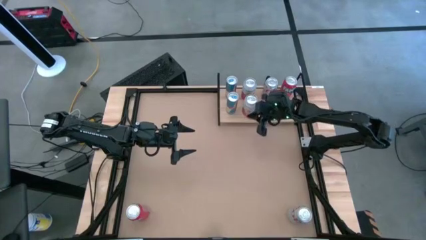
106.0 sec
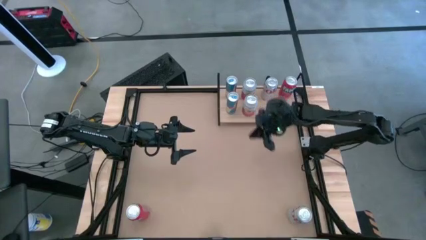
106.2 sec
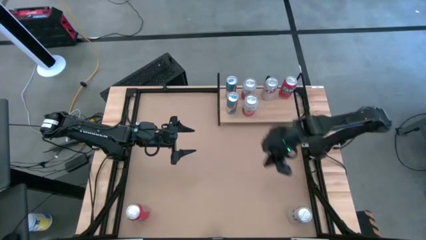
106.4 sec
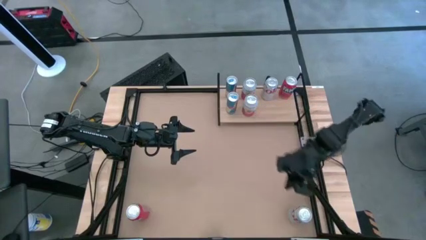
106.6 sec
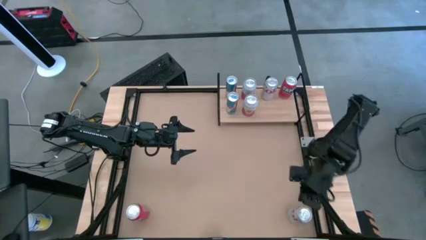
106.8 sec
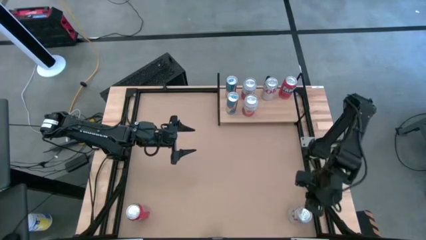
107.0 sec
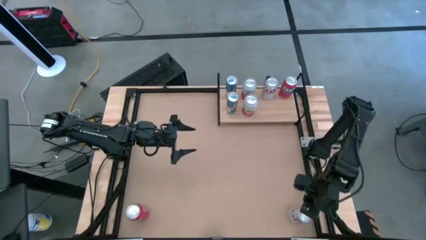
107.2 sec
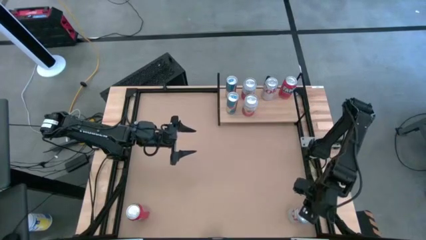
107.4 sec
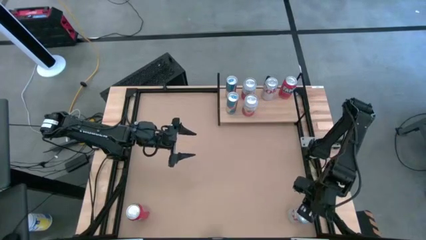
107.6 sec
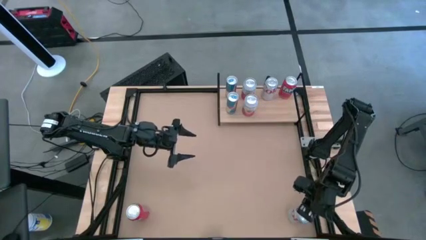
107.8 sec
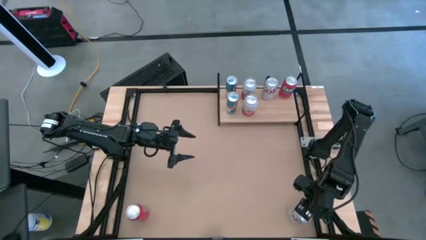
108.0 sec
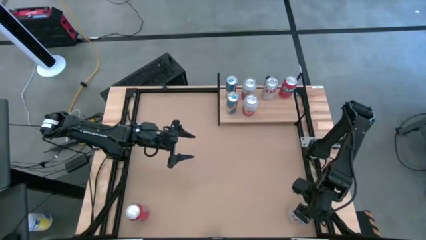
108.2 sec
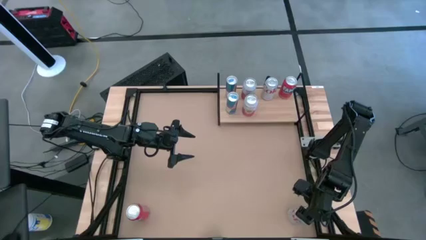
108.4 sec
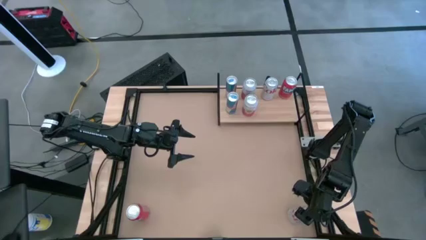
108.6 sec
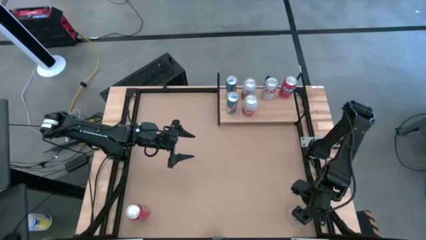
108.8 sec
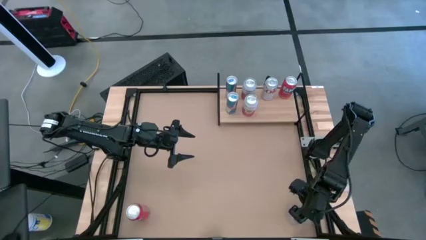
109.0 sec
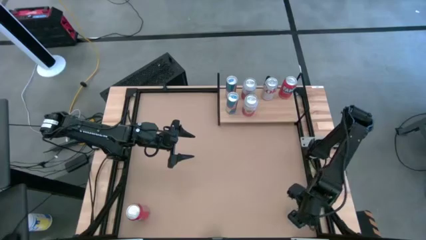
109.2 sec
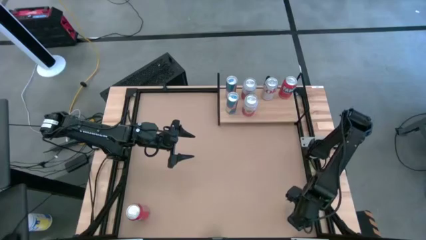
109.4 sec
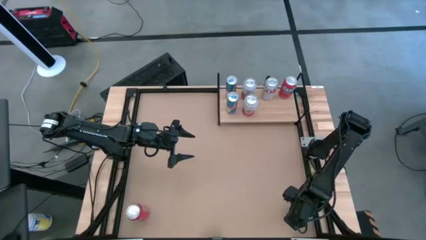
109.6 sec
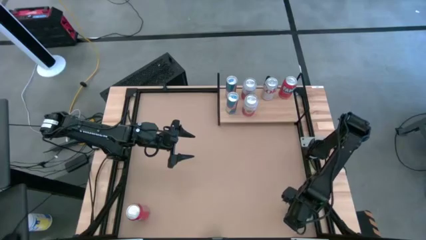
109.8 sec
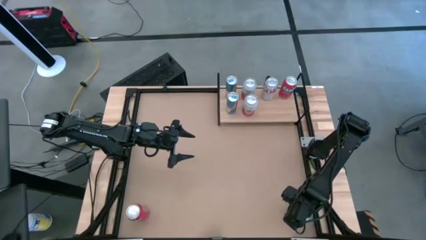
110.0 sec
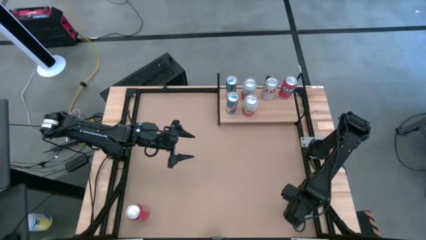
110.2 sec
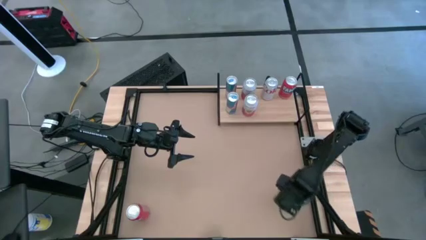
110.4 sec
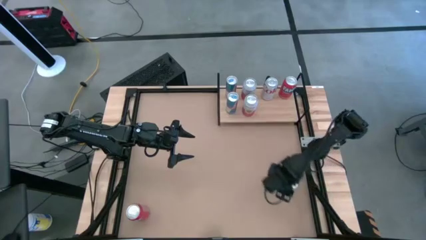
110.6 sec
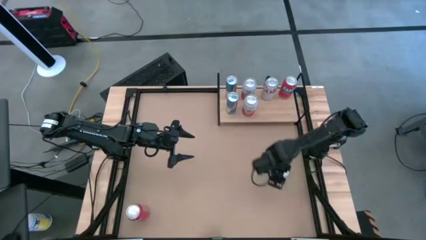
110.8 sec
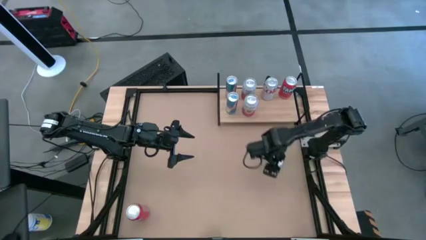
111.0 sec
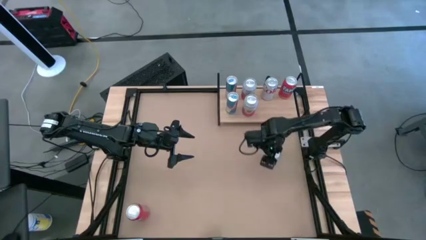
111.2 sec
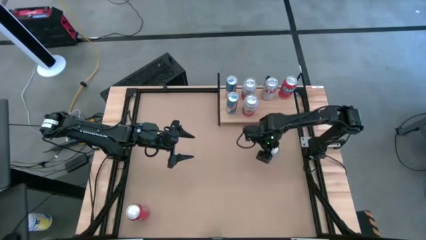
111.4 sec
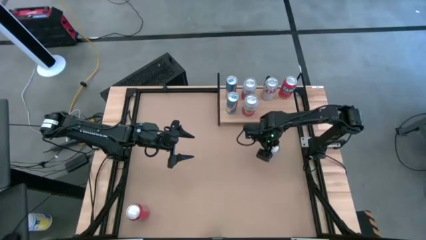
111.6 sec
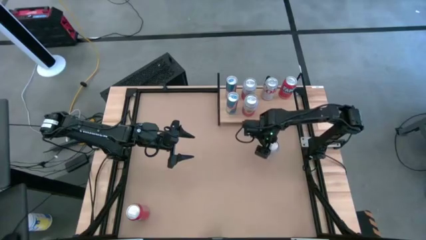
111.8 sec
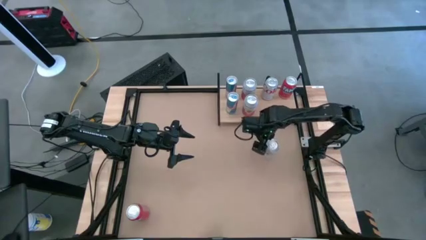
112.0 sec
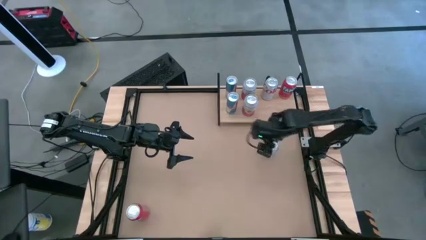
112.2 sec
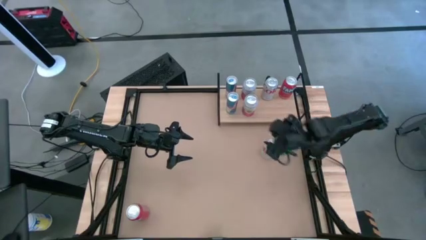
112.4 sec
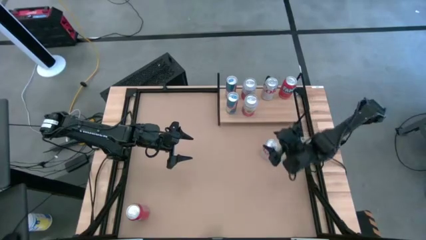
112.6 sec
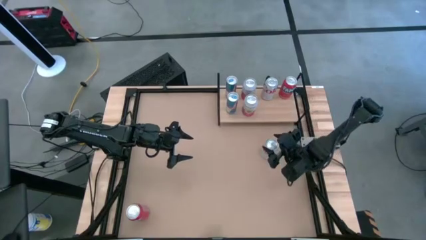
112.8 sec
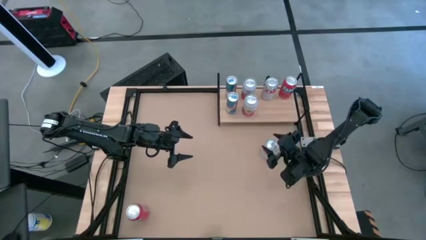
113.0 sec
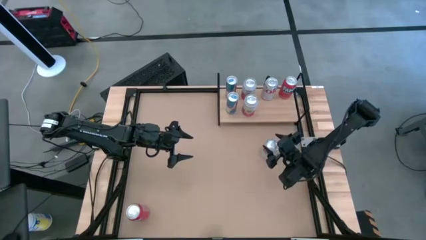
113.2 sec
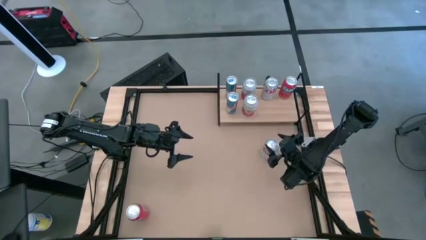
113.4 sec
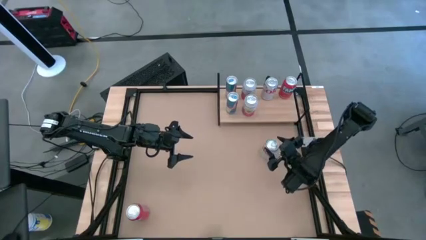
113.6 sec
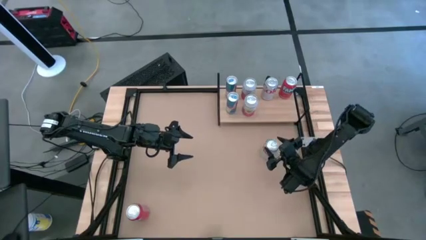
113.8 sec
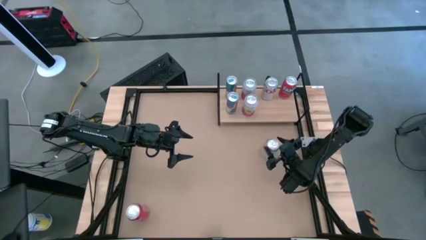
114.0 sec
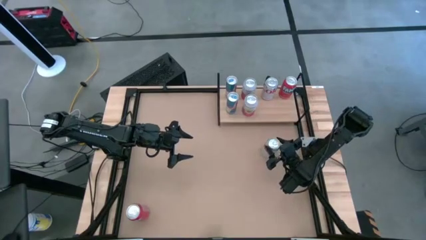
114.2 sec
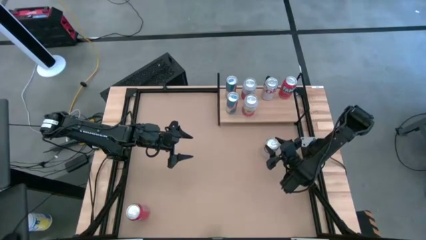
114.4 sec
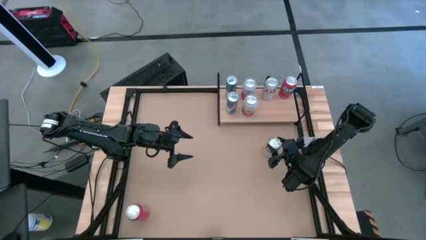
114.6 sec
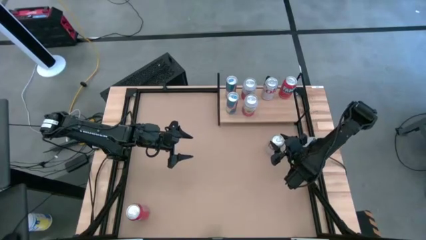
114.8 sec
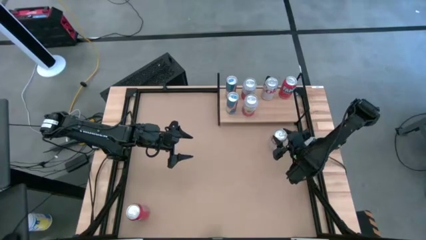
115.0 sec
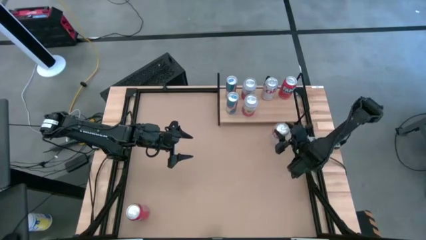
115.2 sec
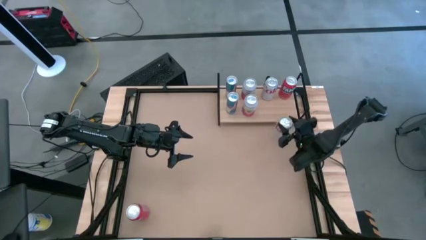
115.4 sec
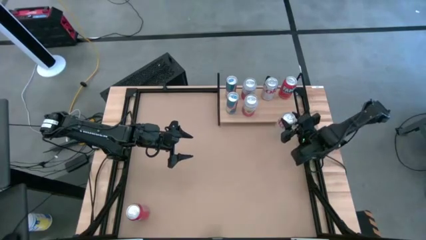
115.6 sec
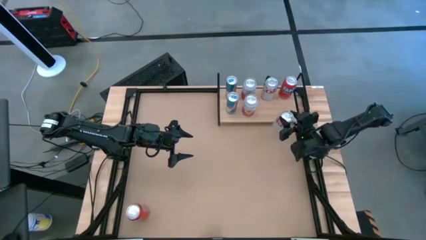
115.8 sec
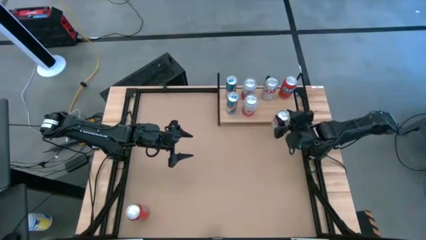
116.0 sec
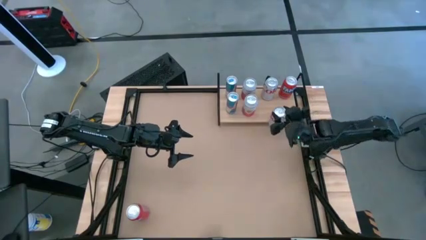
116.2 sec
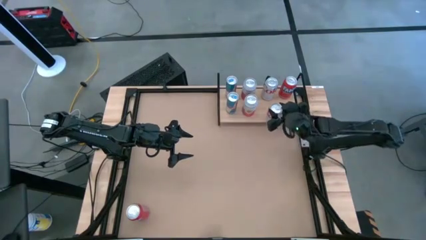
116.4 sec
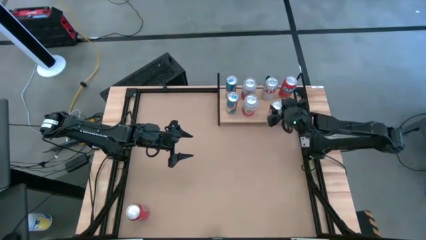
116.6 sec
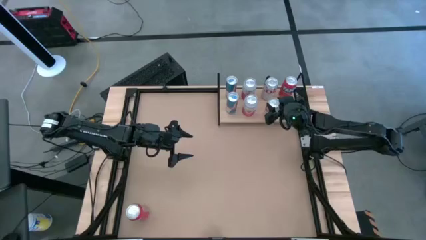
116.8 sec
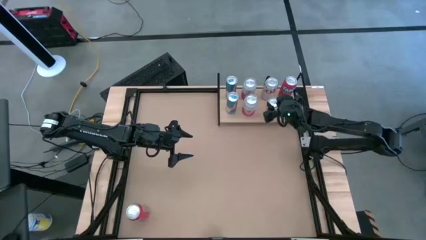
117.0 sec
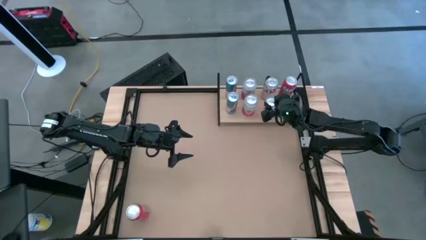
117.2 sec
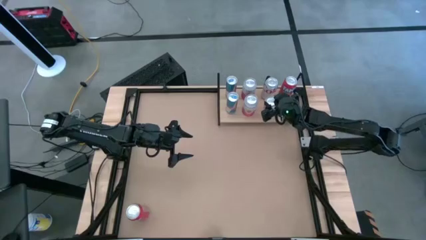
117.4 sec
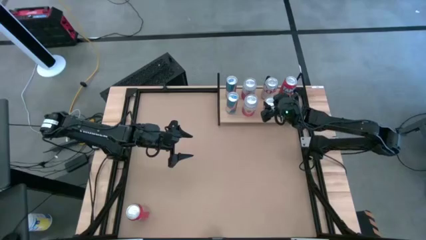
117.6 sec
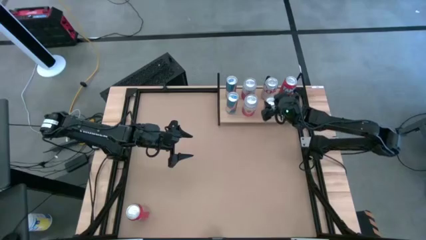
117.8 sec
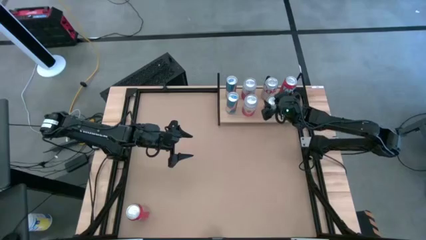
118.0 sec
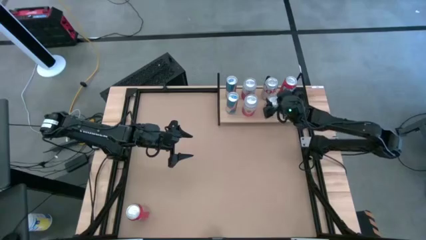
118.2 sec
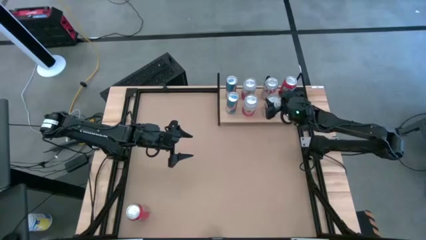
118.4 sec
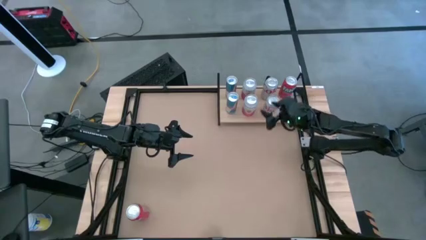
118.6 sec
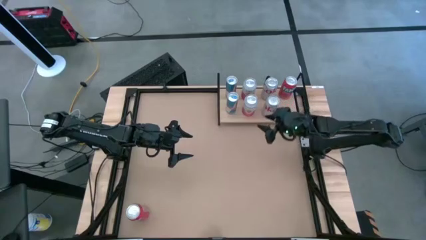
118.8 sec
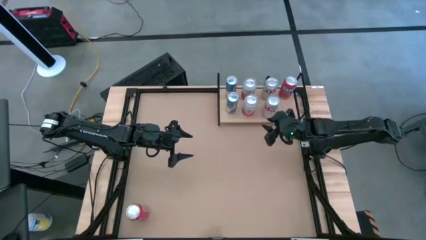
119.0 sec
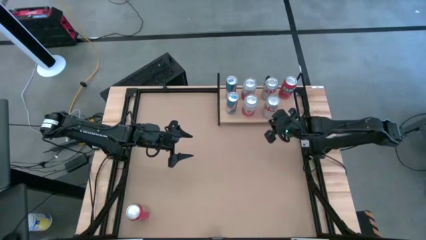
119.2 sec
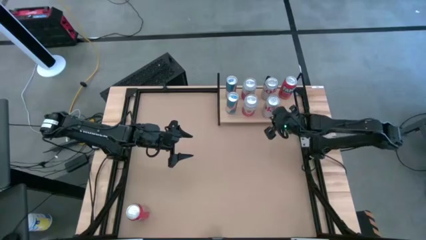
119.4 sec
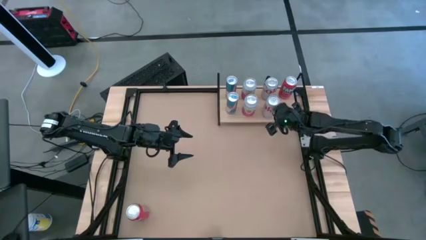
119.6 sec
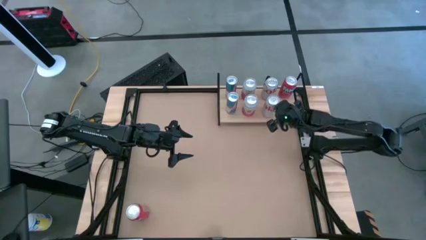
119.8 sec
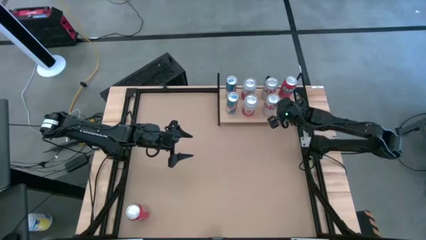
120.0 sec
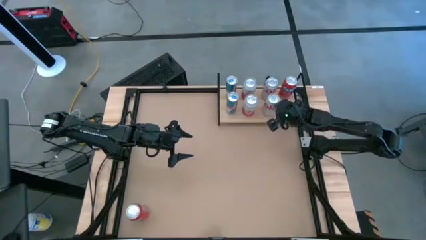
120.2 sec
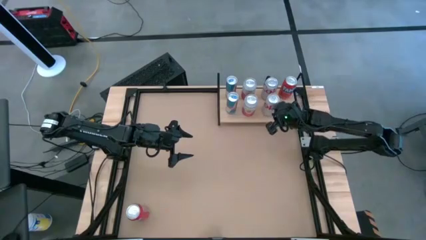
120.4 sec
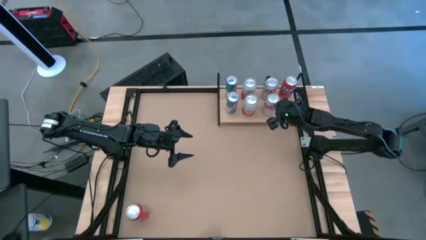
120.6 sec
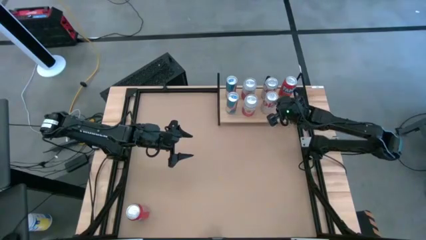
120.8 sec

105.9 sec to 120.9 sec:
Task: Place canned beverage on shelf
Put the red-silver soda can on the shelf aligned with the red-silver soda can
